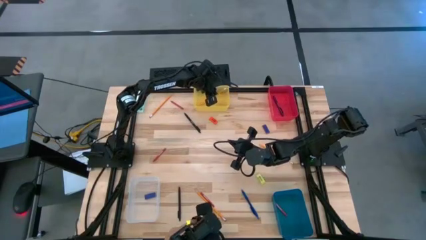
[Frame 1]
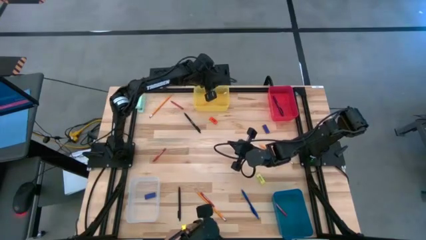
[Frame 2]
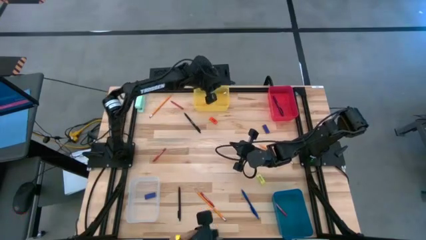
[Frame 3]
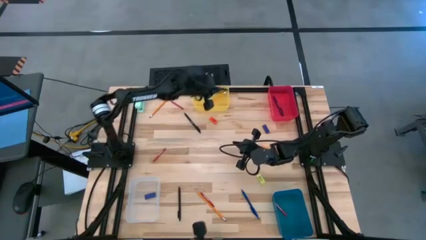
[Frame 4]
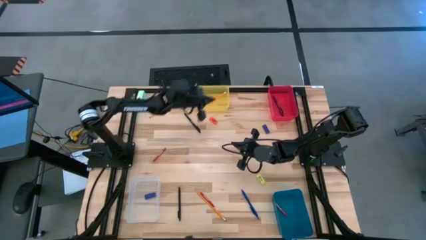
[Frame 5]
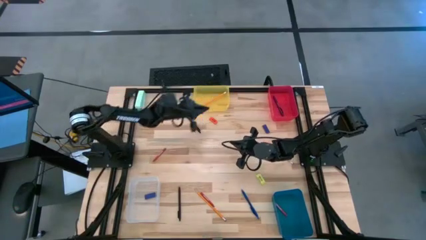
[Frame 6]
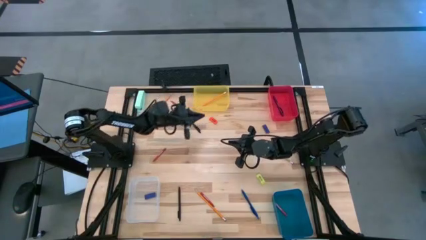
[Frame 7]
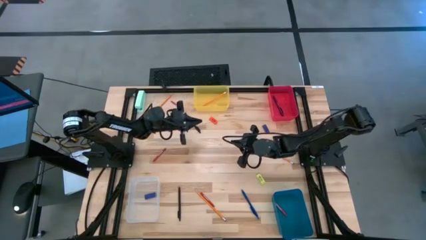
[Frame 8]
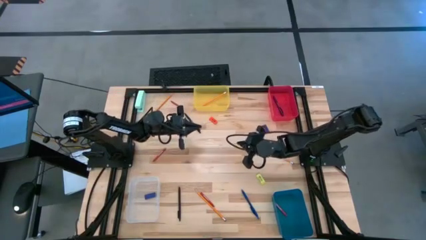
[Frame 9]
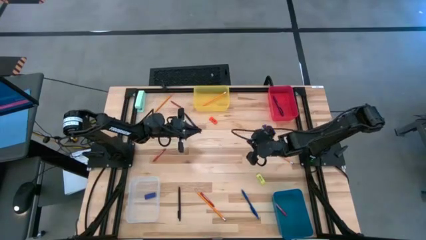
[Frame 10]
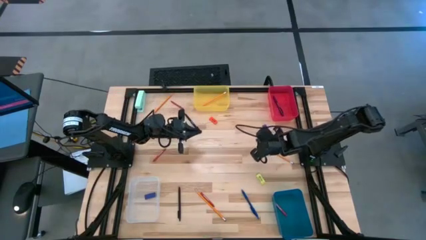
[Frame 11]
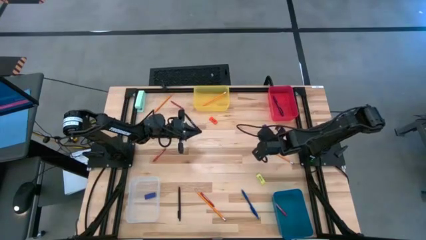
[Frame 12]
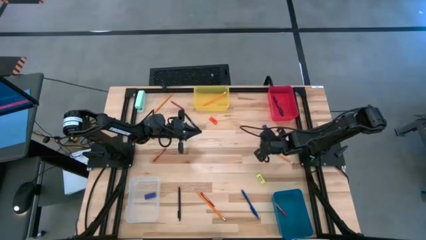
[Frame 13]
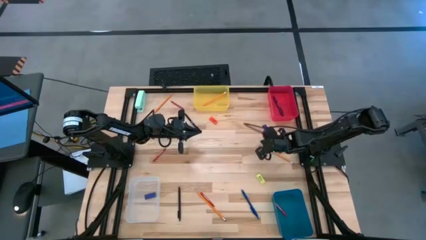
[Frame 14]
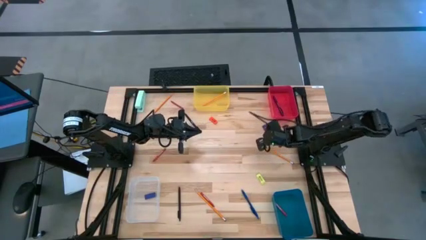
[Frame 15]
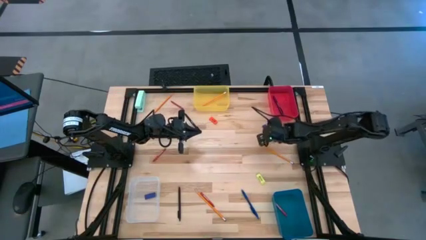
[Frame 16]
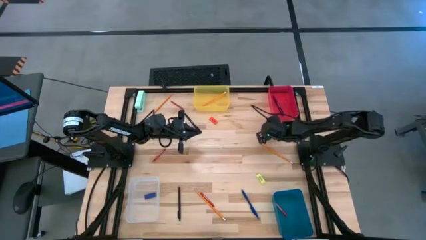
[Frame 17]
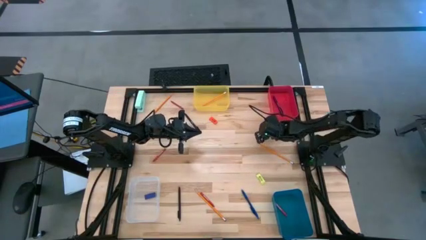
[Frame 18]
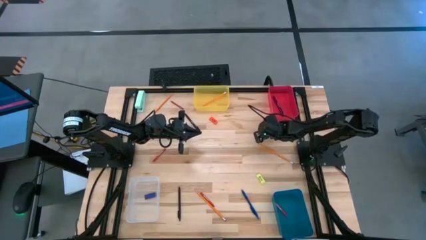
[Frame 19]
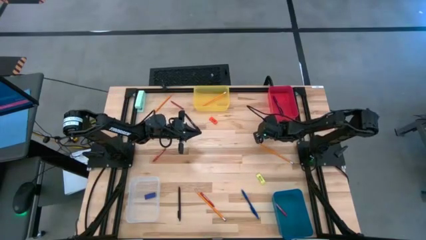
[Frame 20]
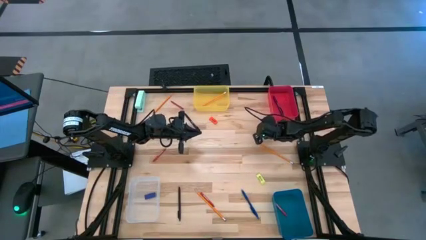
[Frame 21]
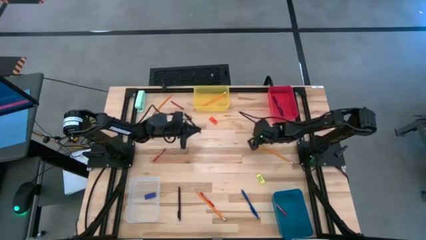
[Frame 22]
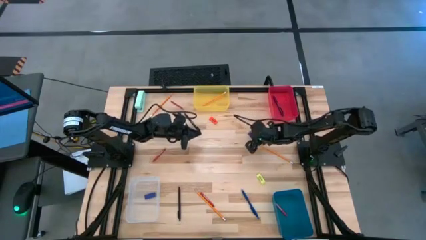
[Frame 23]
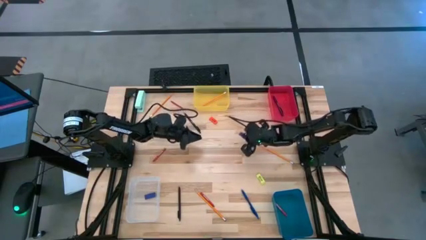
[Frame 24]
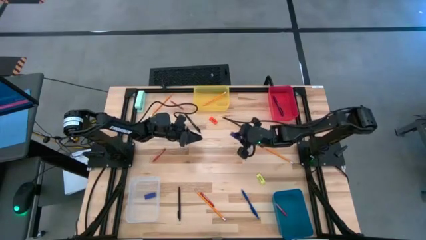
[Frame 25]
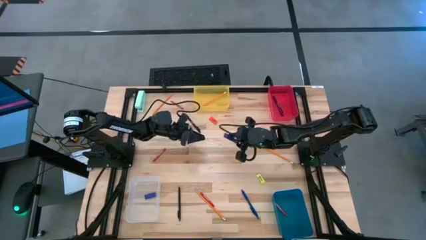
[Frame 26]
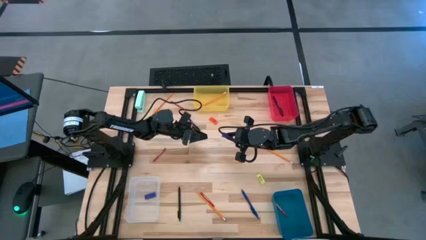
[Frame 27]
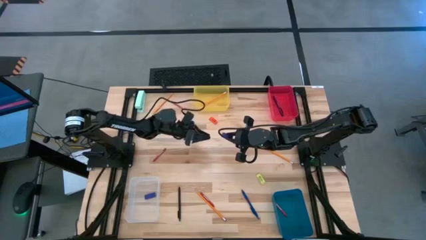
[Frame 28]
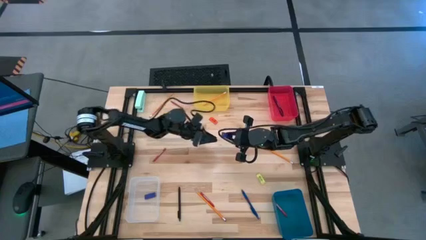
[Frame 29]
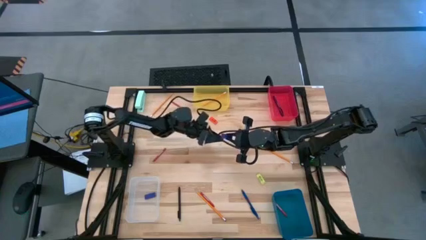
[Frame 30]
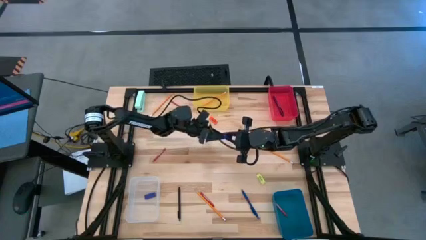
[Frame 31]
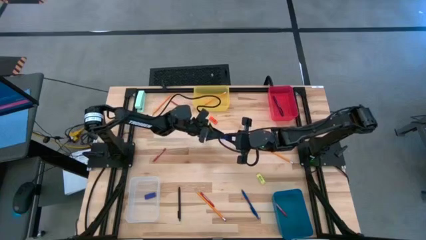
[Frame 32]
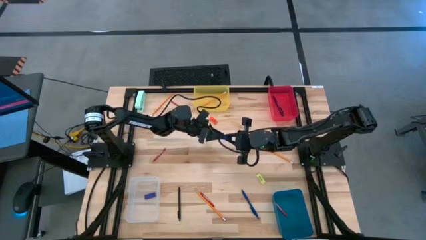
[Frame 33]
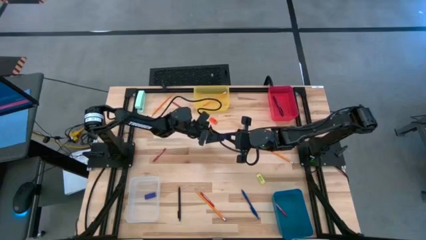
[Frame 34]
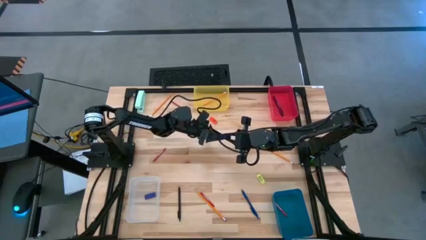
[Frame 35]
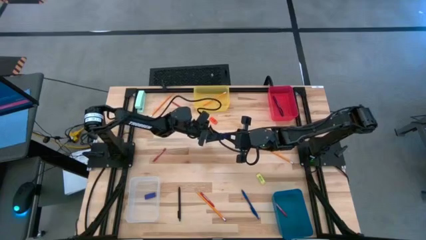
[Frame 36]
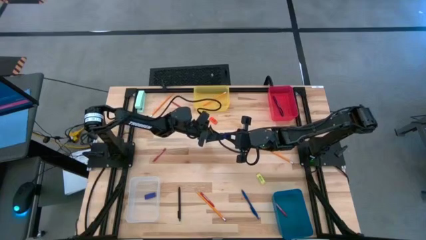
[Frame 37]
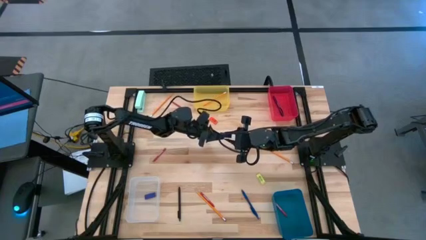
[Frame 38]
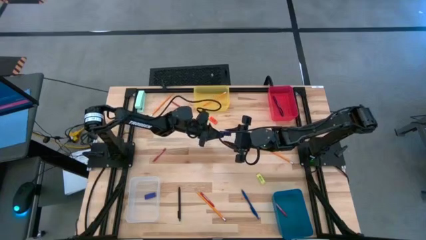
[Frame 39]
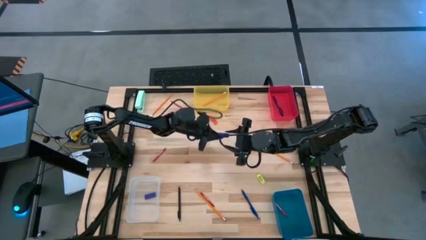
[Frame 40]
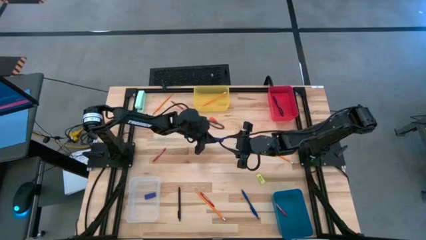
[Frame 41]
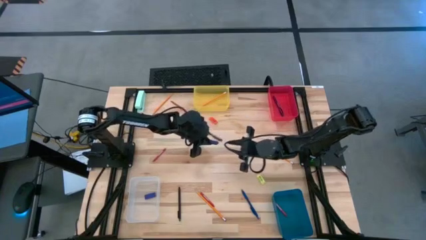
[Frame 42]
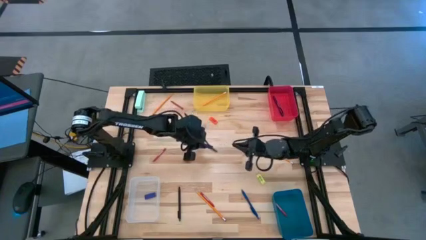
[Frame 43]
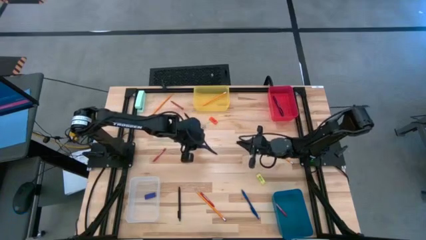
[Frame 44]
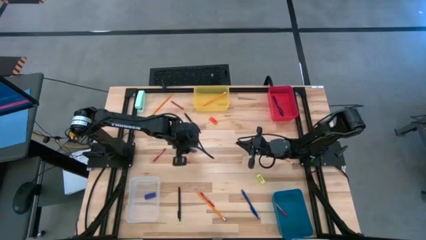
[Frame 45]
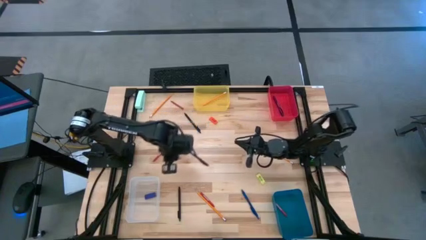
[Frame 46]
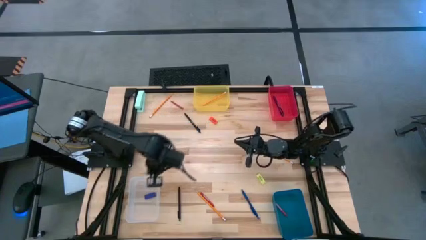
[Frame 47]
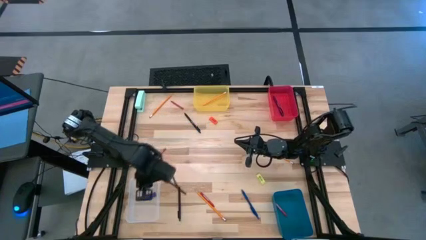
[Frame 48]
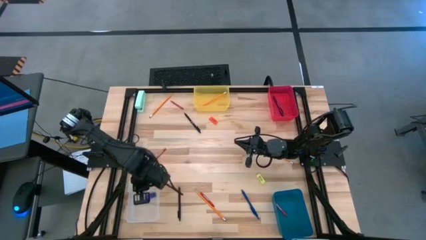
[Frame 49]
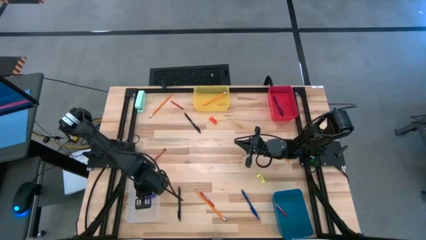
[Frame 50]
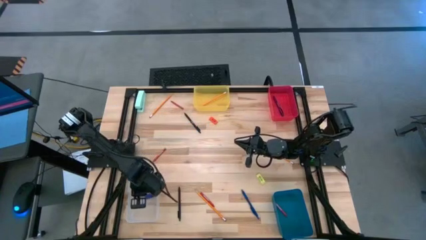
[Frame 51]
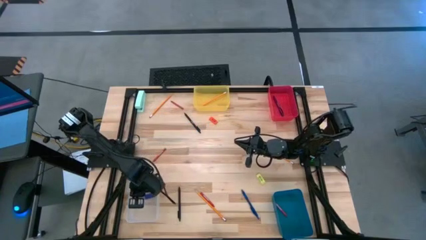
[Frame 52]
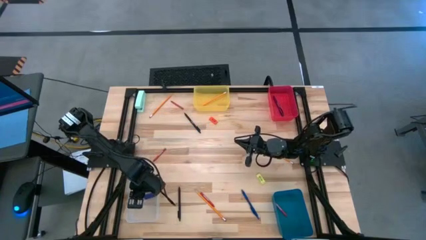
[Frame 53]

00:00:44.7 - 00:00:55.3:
Task: Sort crayons/erasers/pens/pencils in bins
Put the blue eraser into the transparent bin

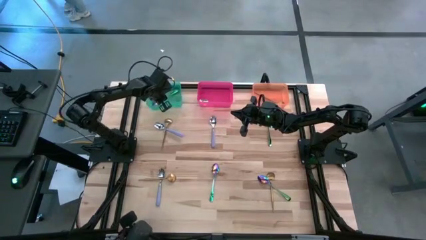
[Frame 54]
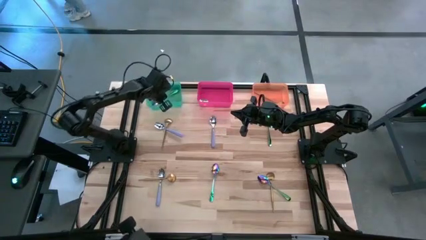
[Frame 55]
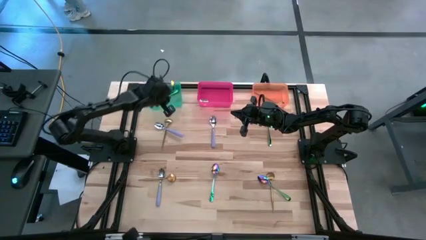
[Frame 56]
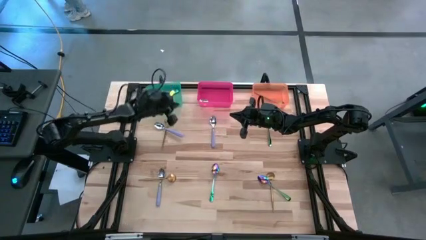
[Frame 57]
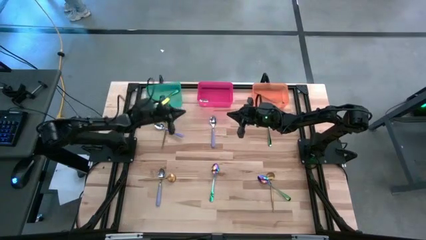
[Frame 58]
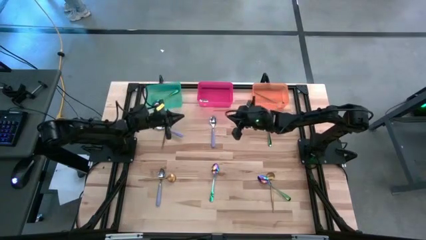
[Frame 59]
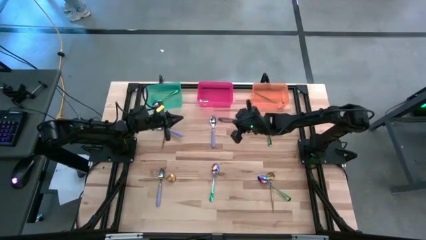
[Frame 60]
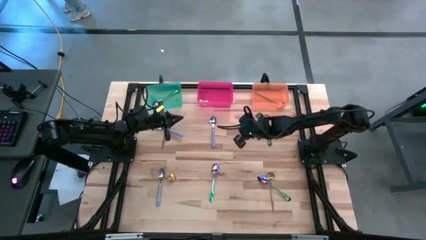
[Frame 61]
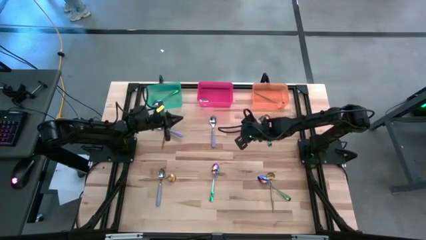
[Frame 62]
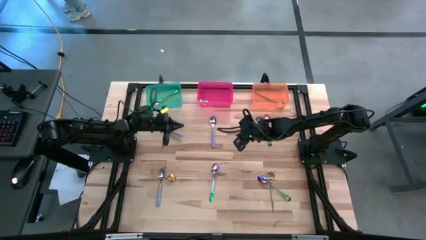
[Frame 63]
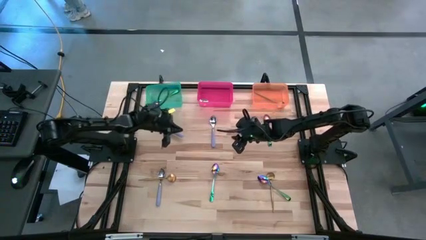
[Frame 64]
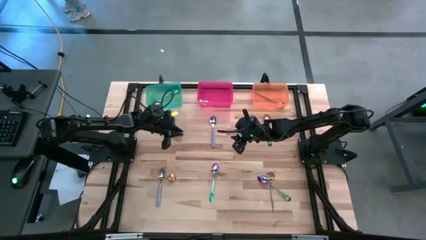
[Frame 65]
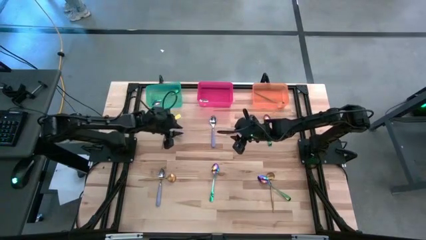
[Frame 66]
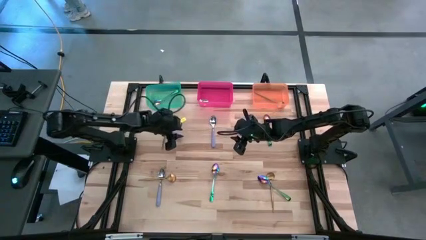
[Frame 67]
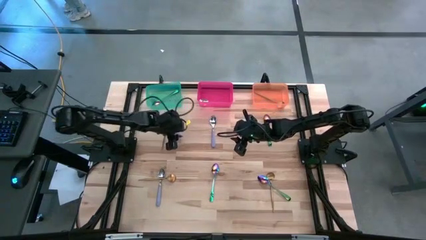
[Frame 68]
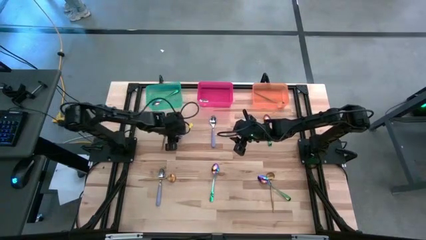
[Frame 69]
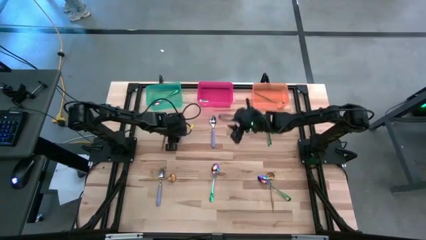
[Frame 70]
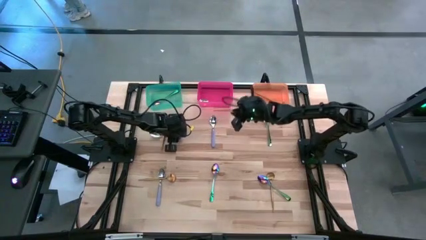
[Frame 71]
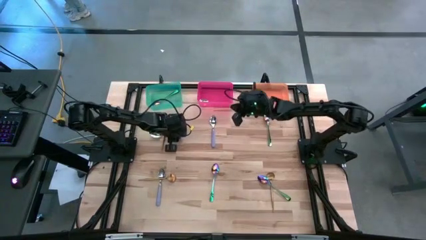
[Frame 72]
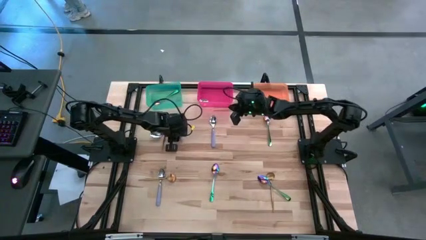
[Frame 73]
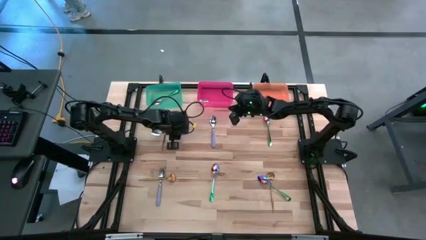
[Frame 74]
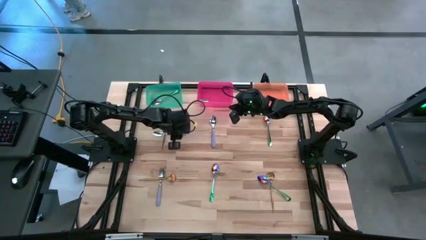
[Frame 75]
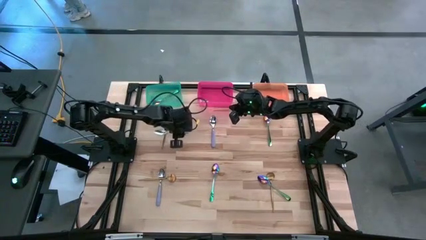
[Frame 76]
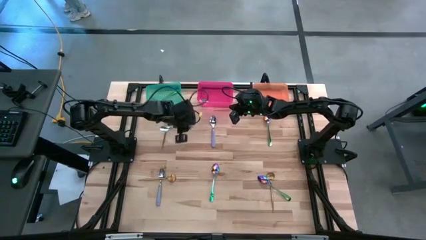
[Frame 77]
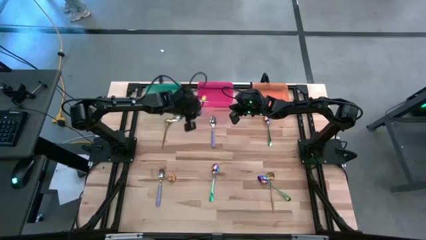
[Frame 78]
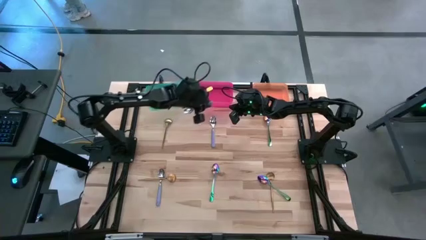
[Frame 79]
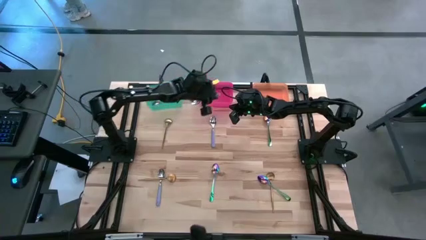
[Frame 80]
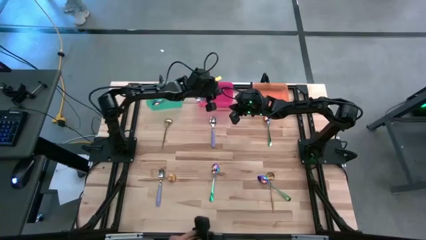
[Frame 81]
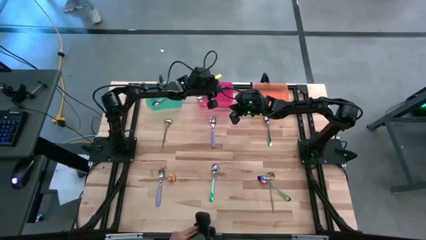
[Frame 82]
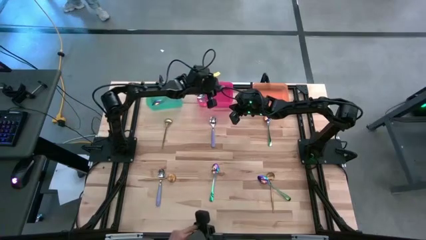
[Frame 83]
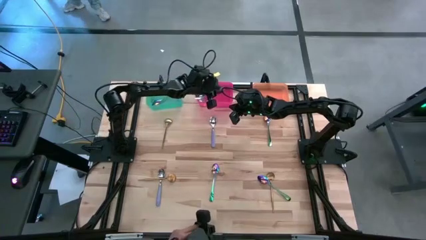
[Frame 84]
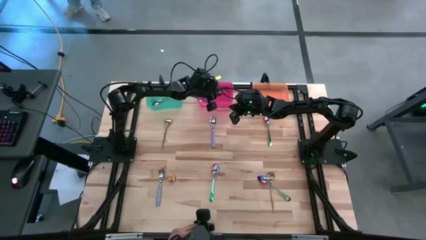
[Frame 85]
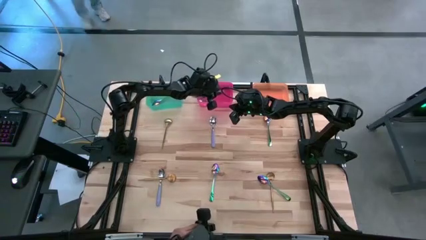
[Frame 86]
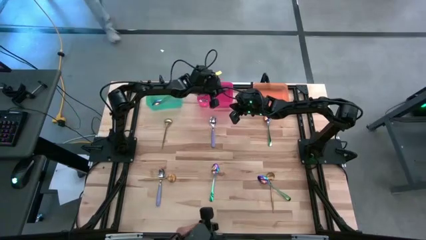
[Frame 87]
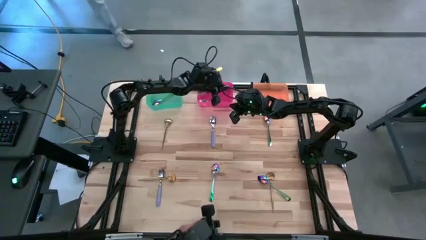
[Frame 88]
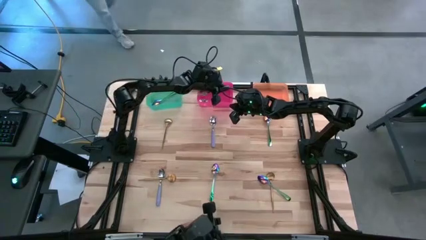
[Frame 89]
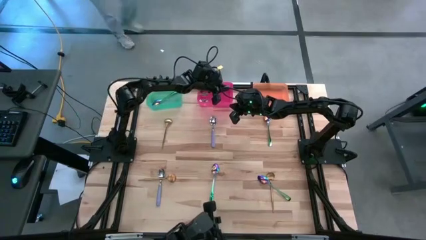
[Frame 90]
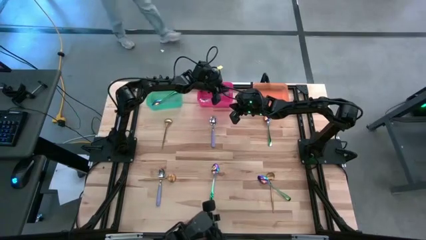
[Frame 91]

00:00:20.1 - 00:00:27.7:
Task: Sort silverware by color (type)
Put the purple spoon into the red bin
